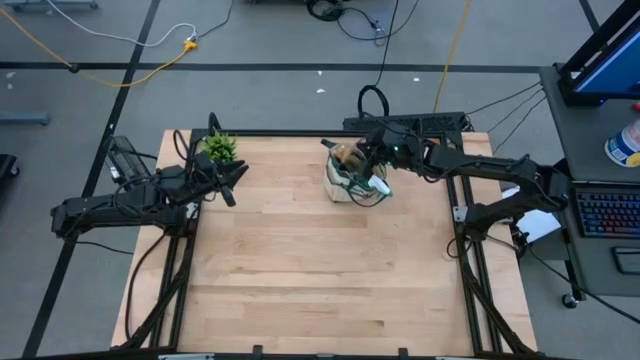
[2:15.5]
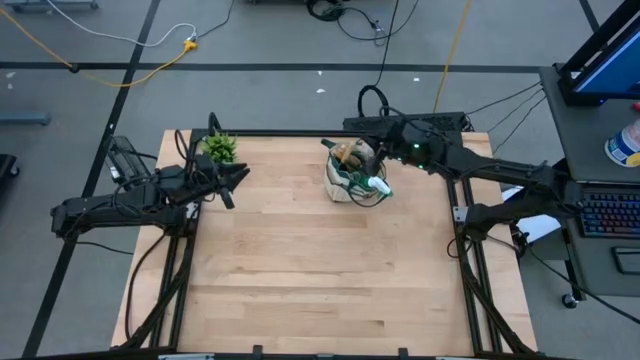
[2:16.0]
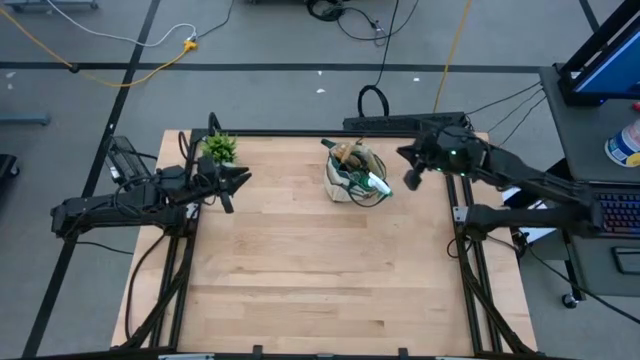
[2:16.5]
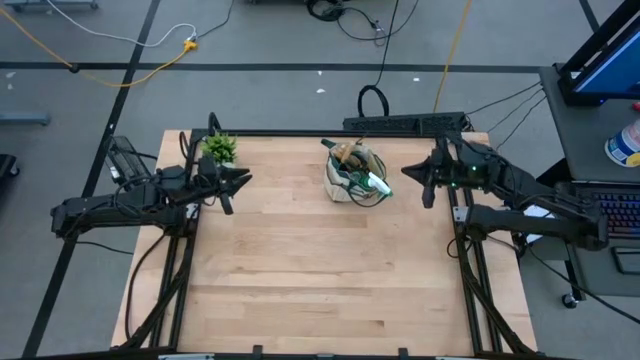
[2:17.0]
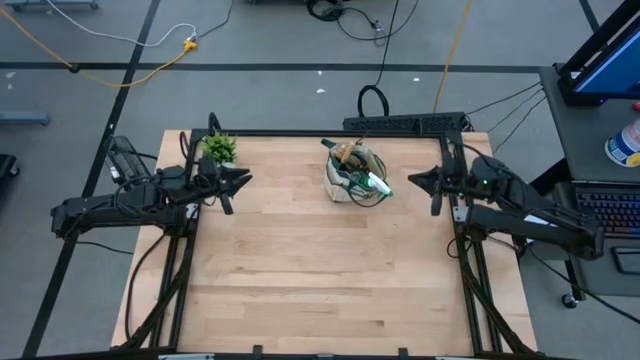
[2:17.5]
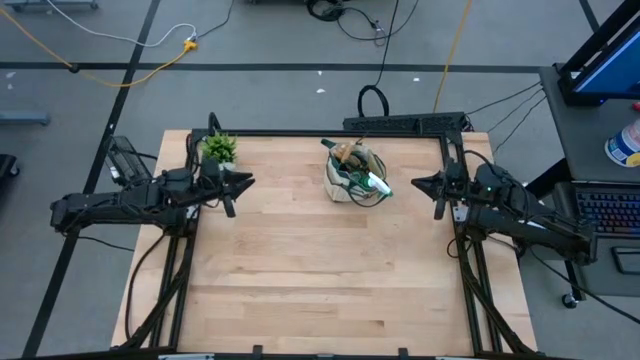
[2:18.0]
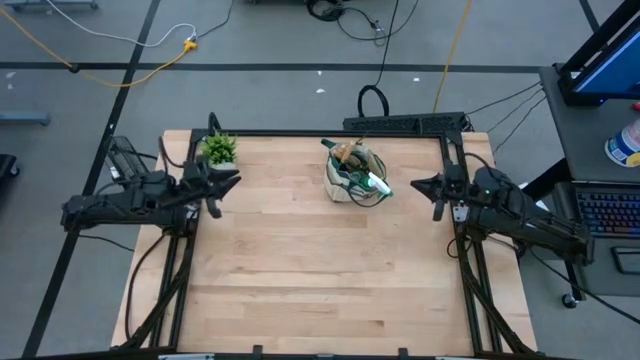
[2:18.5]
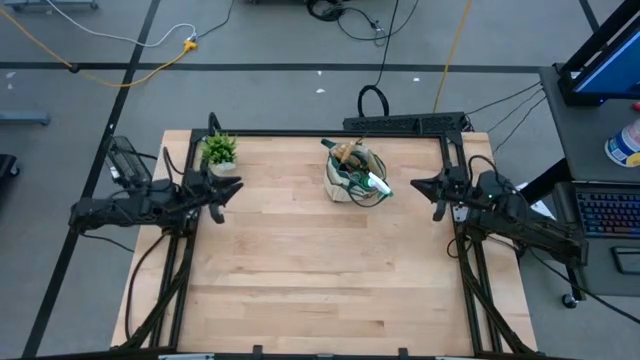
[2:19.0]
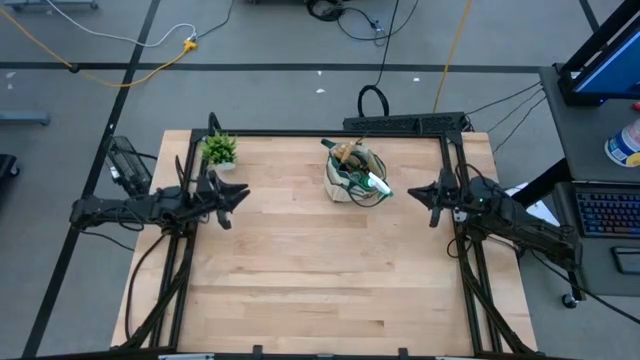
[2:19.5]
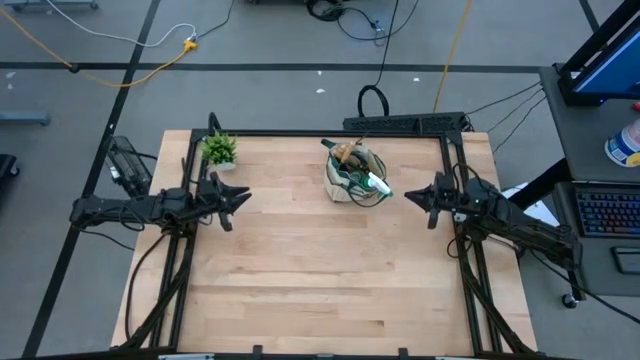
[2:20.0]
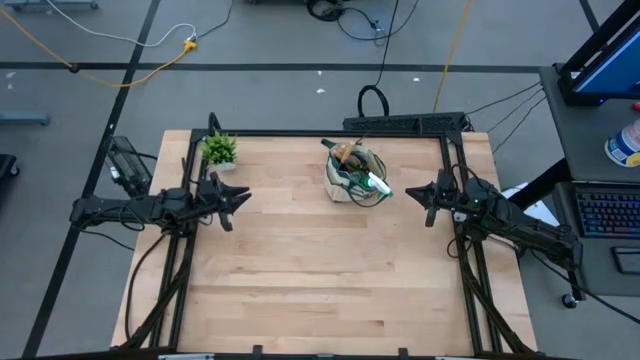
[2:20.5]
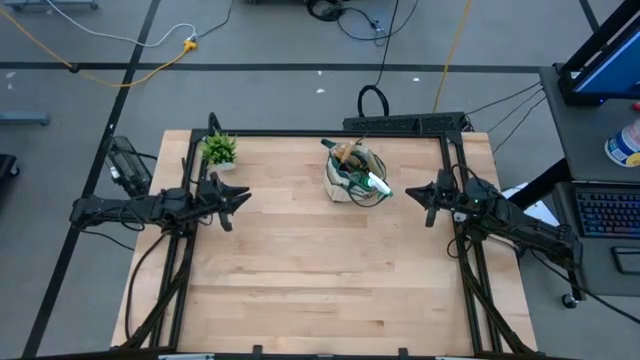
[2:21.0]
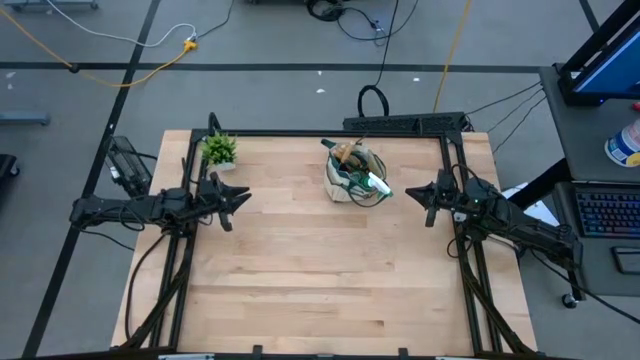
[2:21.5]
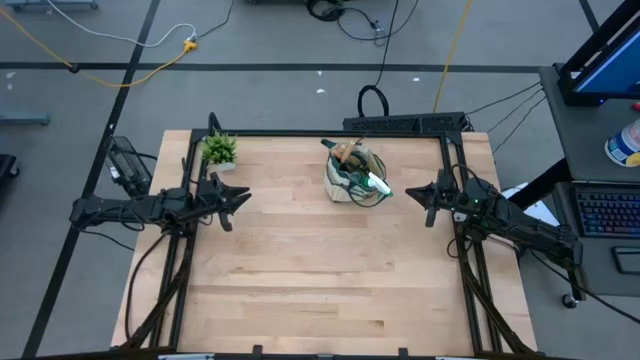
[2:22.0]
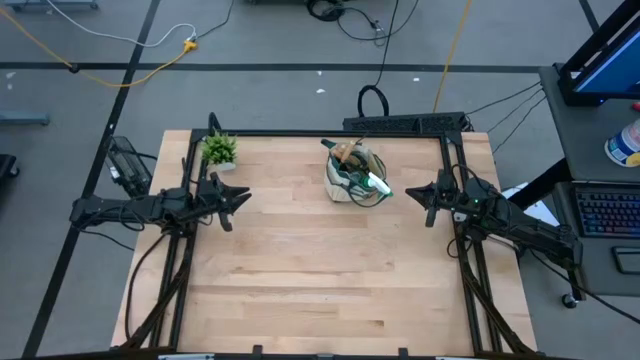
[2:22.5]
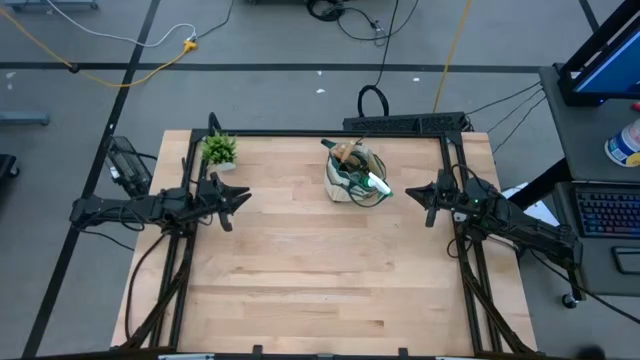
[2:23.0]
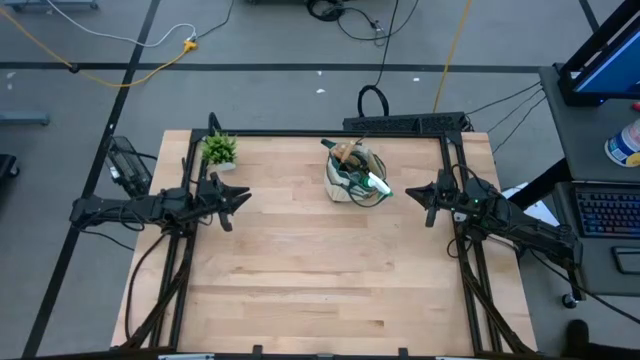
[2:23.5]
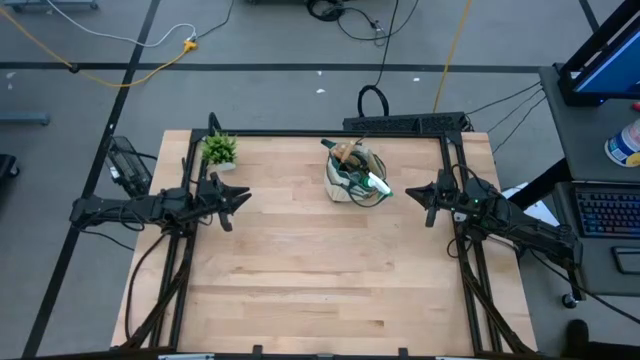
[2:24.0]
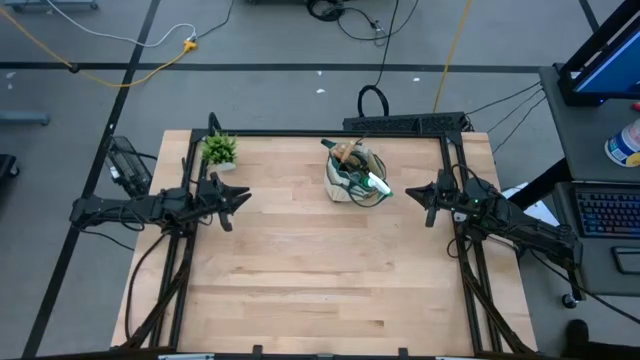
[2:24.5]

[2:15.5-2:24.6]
Task: Pick & Place Garden tools in Gardening bag
Return to Home Position

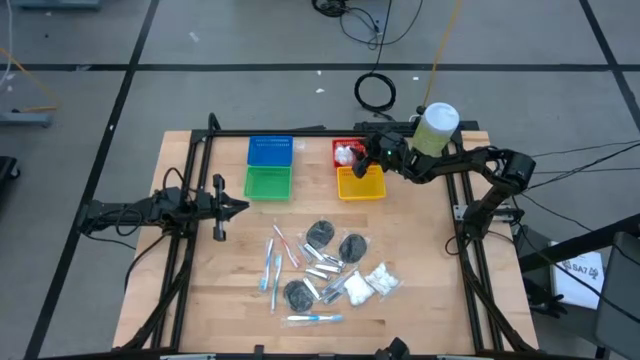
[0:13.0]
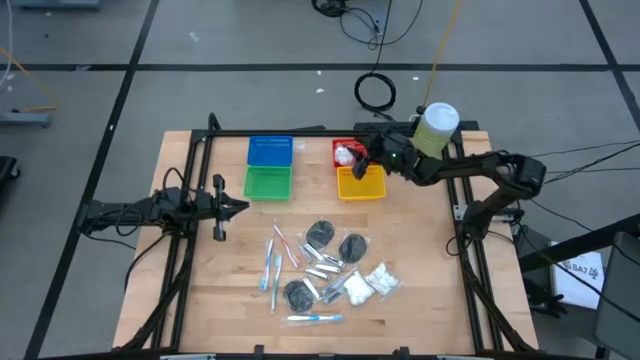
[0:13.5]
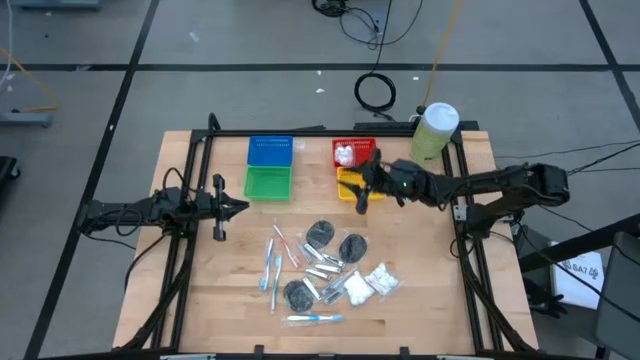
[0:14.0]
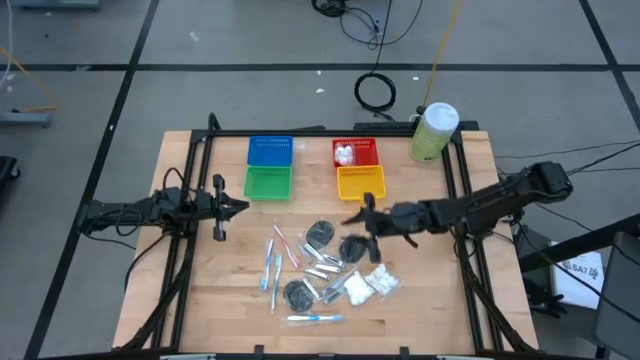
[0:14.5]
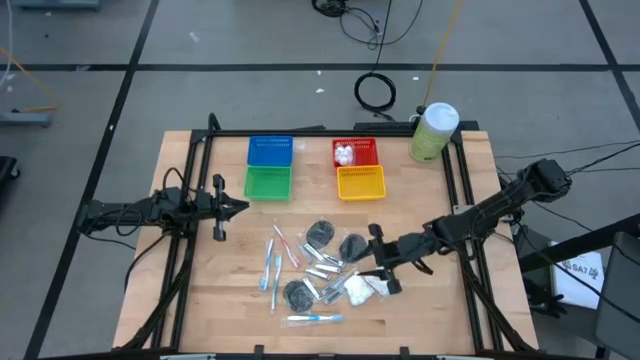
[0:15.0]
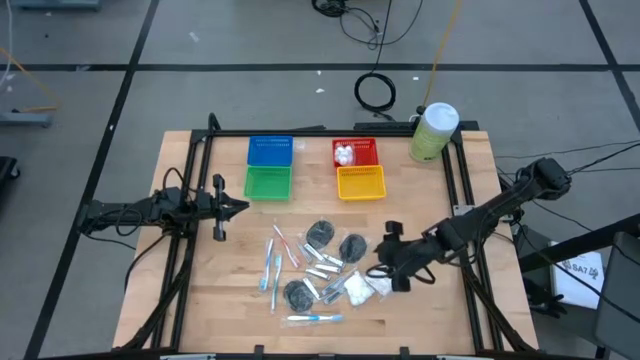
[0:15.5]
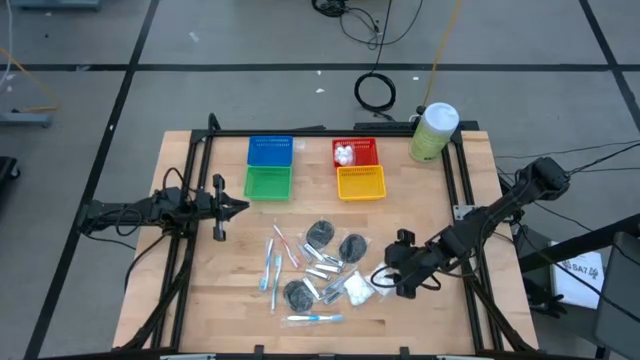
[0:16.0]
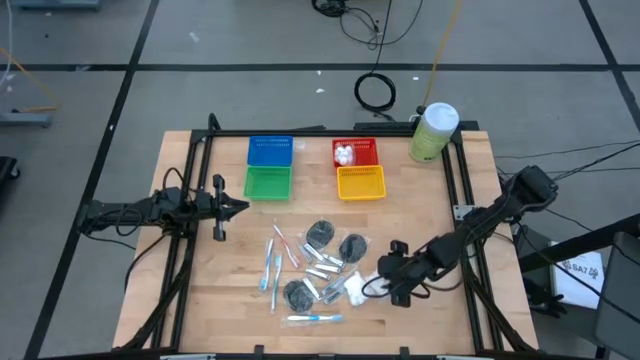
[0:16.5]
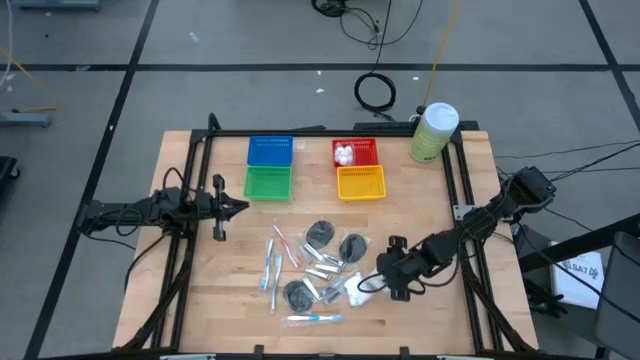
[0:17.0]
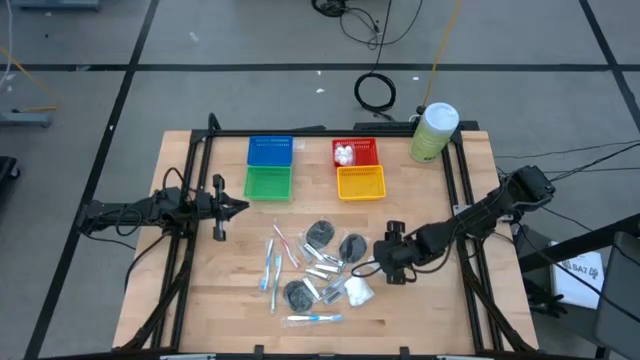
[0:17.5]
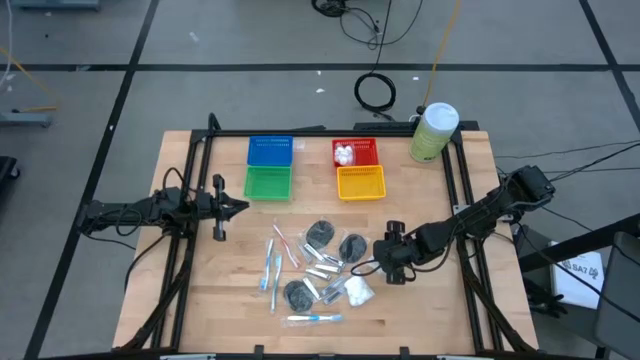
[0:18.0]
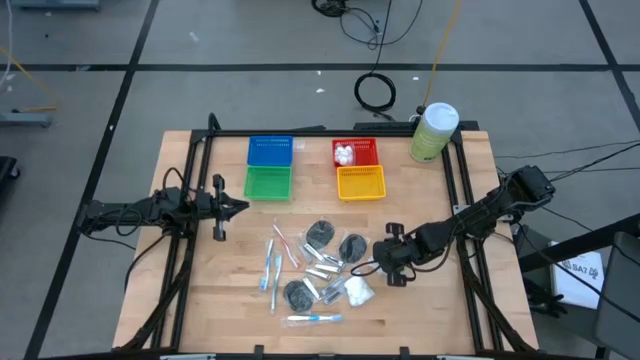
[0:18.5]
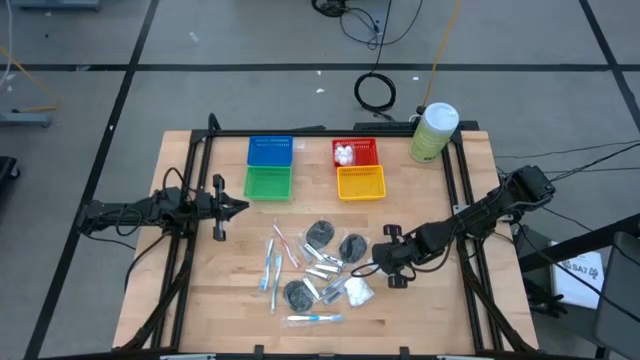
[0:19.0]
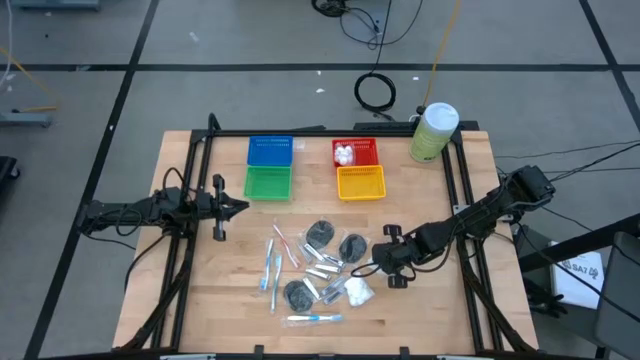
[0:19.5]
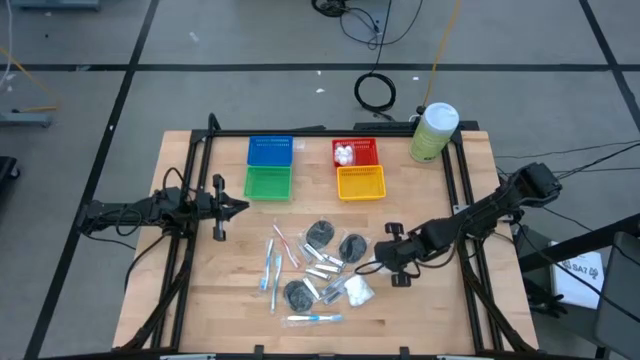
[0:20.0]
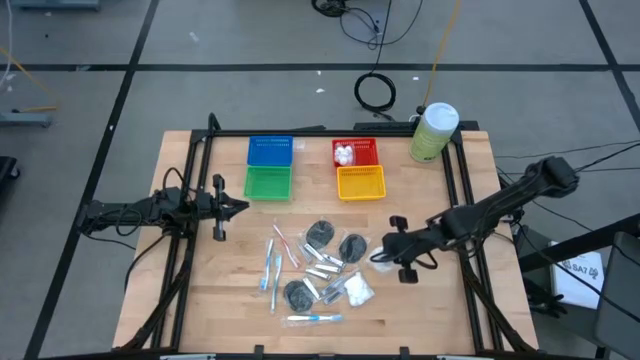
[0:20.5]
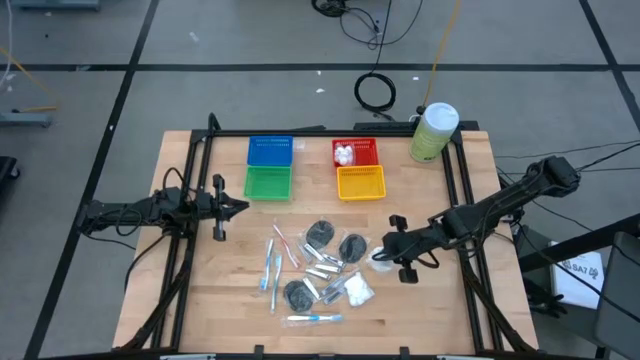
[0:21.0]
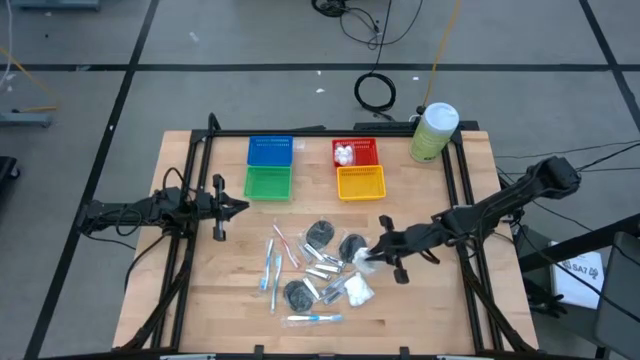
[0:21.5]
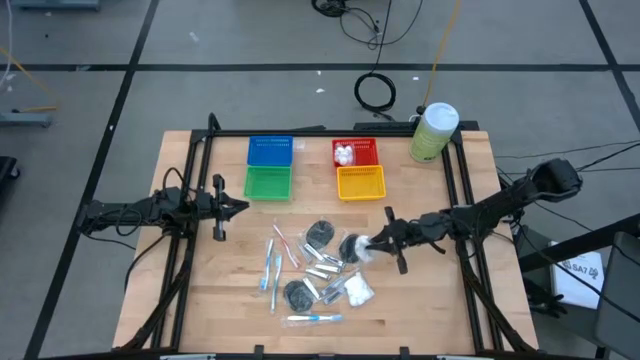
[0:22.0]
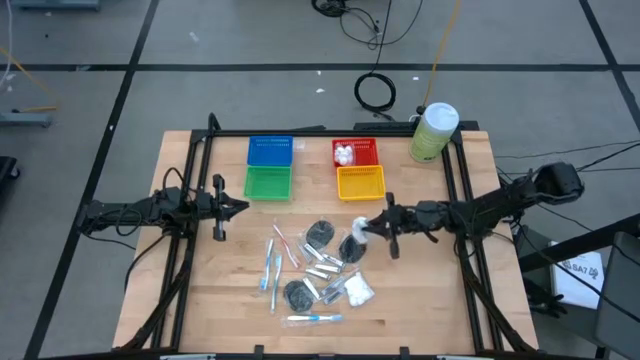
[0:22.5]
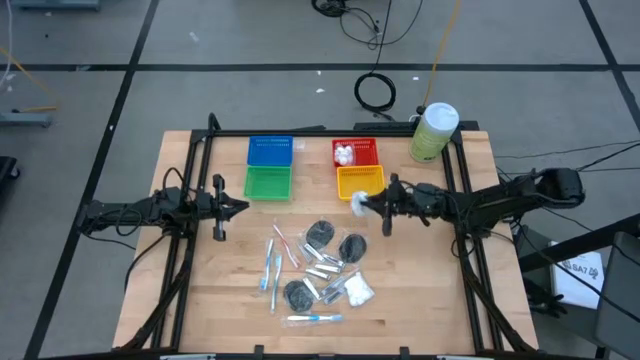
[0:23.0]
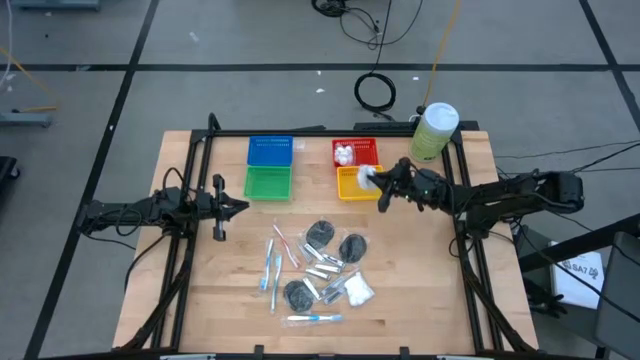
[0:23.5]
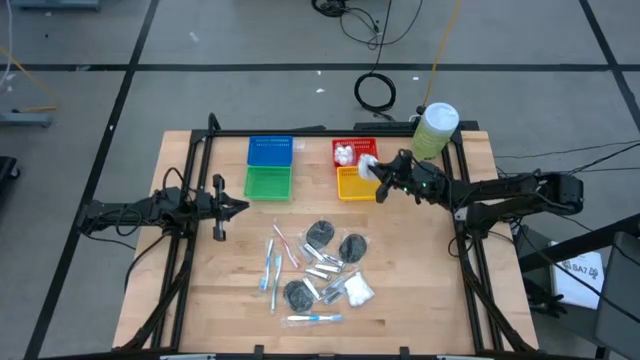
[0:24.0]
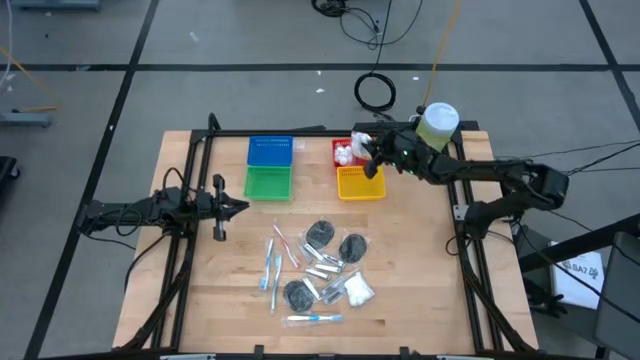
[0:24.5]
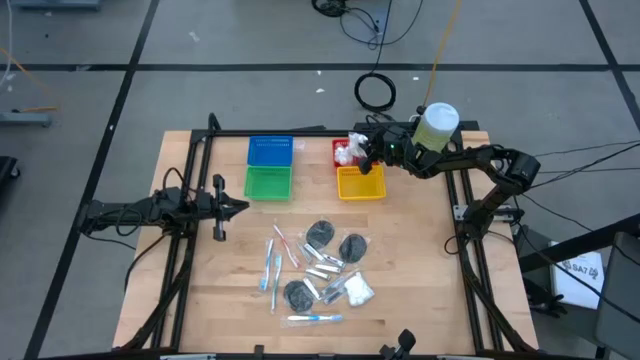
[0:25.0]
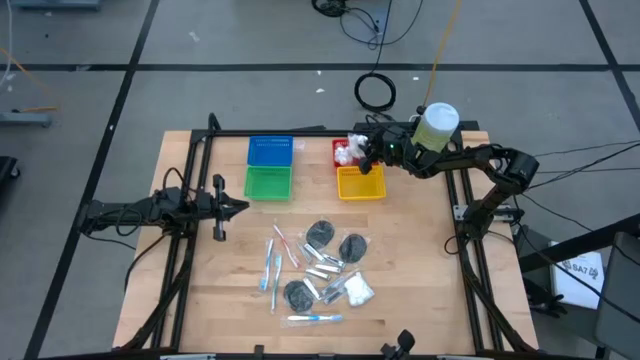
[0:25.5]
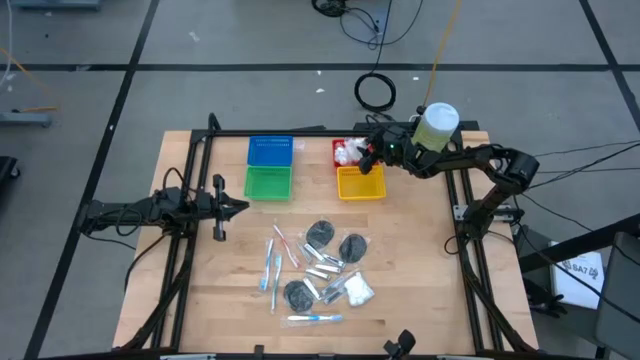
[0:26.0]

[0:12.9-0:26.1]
Task: Pick & Place Travel size toiletries
Put the cotton pack into the red bin
